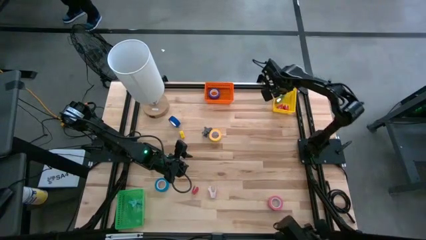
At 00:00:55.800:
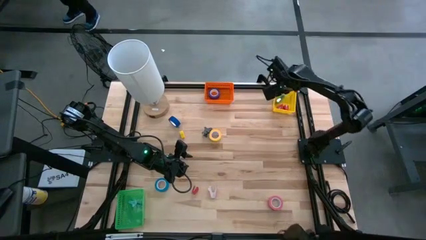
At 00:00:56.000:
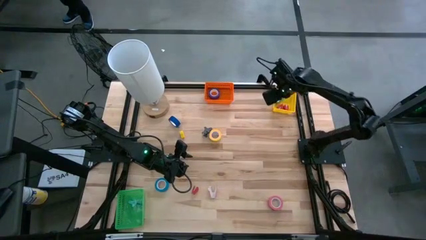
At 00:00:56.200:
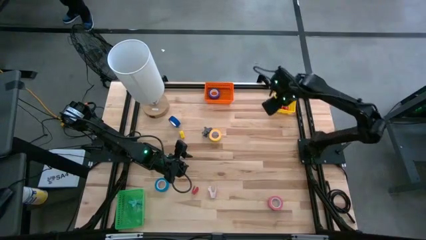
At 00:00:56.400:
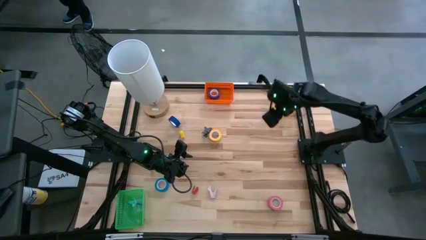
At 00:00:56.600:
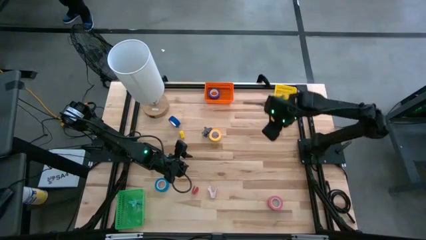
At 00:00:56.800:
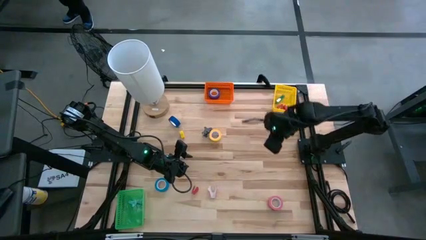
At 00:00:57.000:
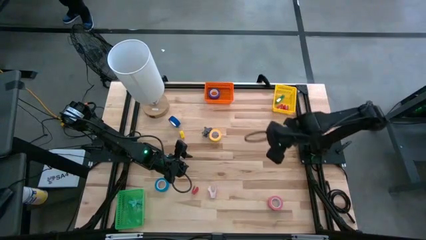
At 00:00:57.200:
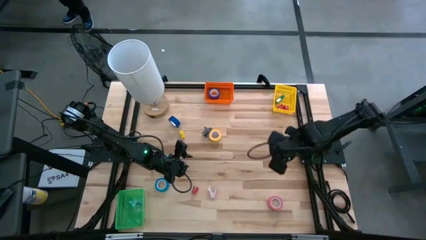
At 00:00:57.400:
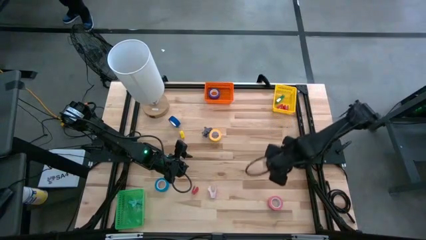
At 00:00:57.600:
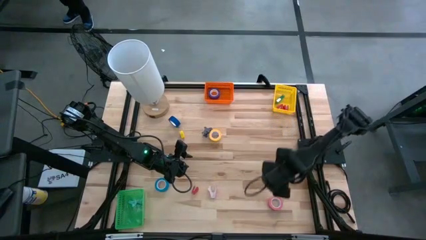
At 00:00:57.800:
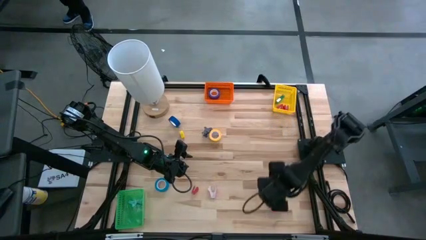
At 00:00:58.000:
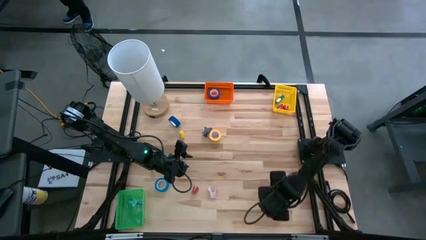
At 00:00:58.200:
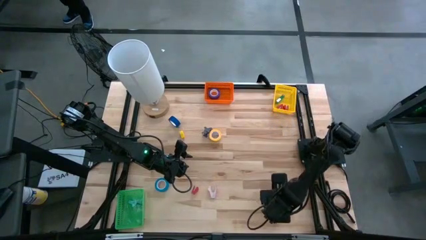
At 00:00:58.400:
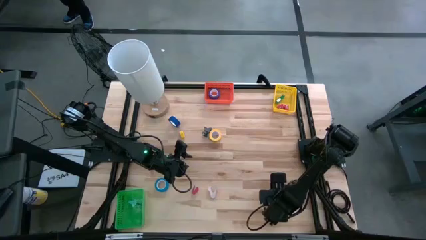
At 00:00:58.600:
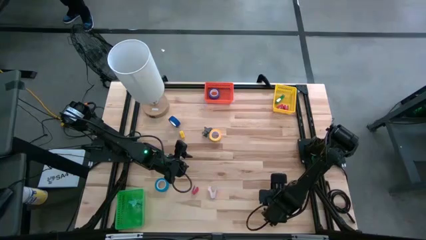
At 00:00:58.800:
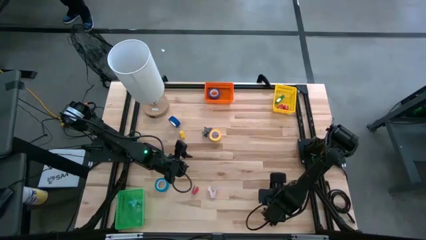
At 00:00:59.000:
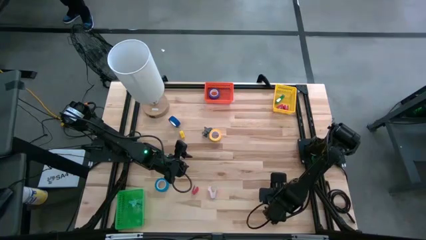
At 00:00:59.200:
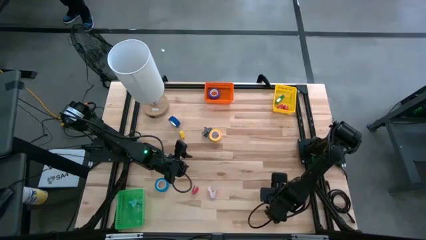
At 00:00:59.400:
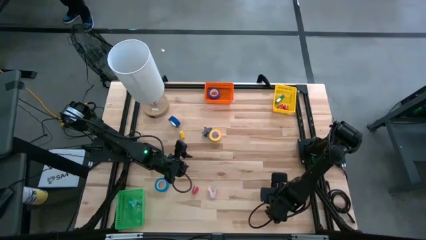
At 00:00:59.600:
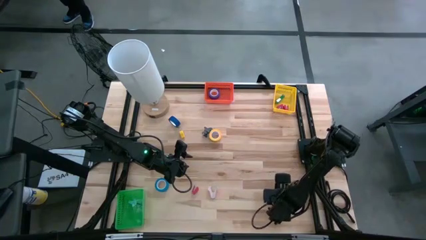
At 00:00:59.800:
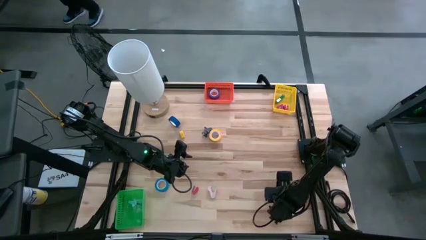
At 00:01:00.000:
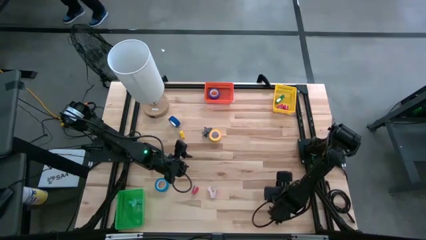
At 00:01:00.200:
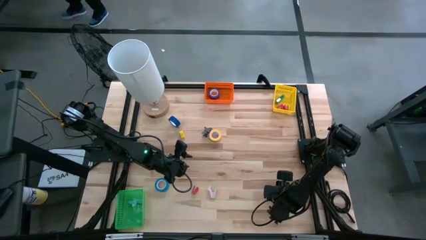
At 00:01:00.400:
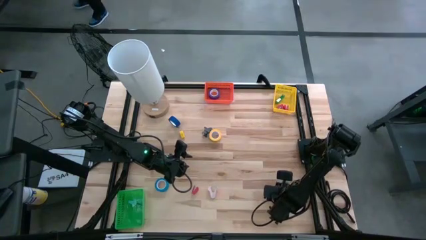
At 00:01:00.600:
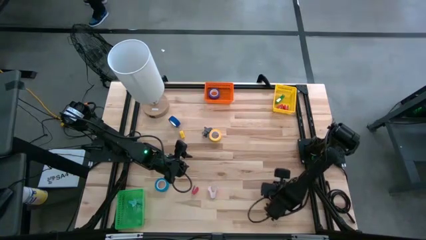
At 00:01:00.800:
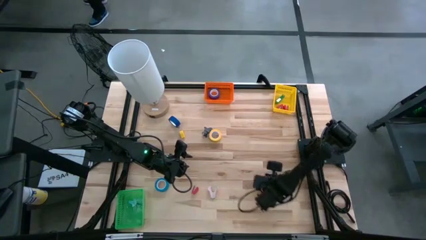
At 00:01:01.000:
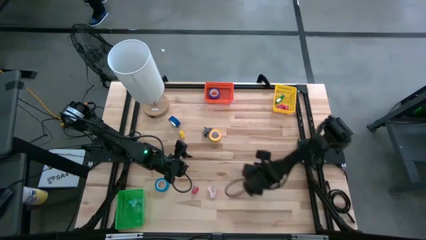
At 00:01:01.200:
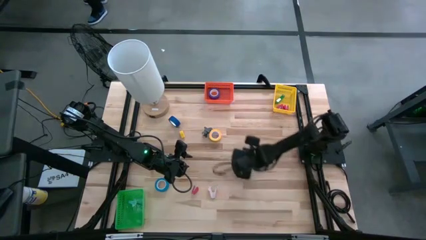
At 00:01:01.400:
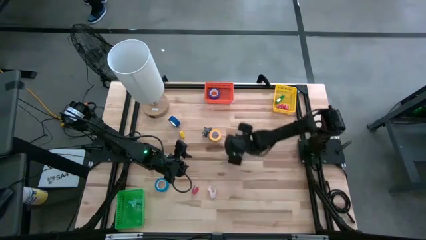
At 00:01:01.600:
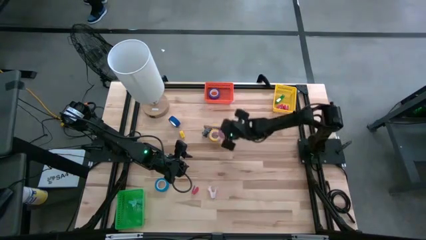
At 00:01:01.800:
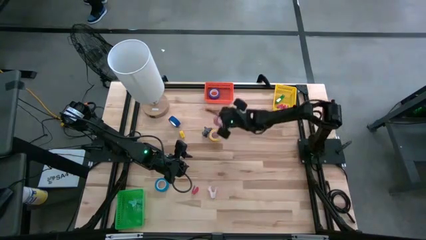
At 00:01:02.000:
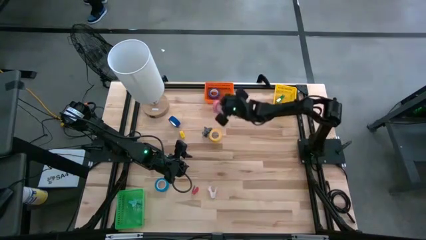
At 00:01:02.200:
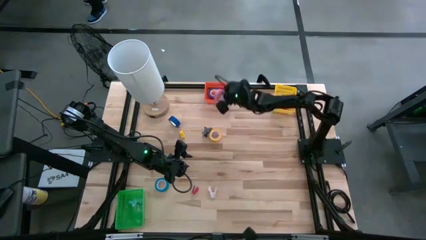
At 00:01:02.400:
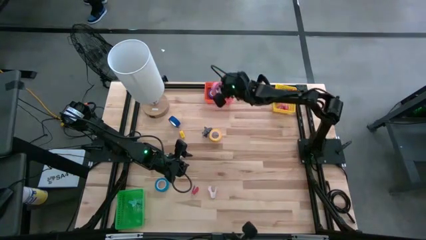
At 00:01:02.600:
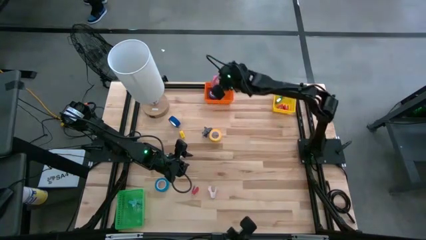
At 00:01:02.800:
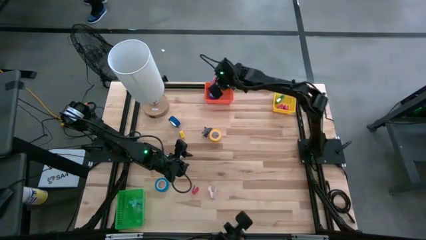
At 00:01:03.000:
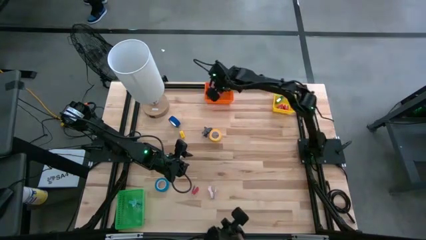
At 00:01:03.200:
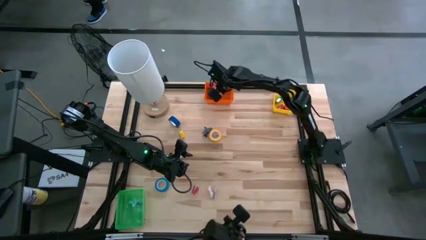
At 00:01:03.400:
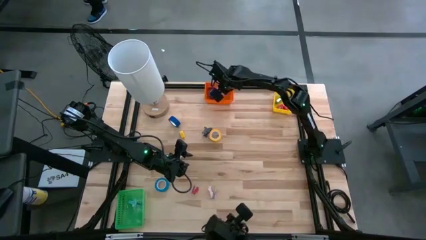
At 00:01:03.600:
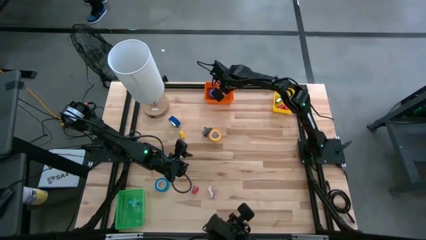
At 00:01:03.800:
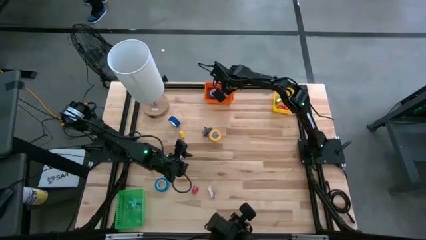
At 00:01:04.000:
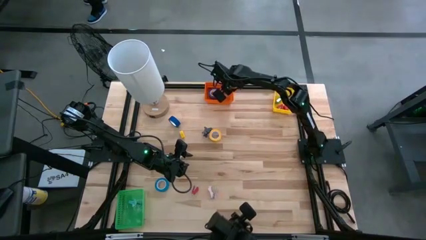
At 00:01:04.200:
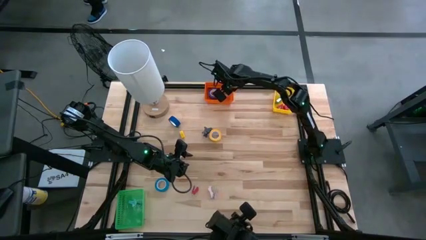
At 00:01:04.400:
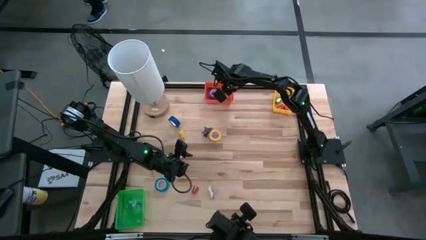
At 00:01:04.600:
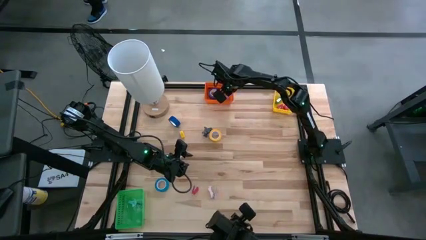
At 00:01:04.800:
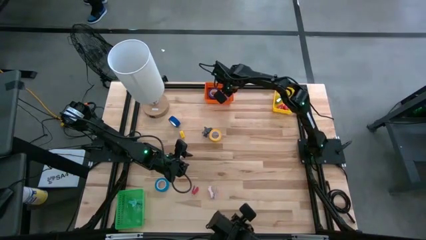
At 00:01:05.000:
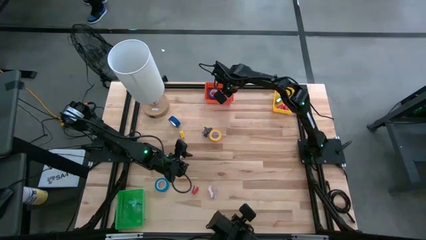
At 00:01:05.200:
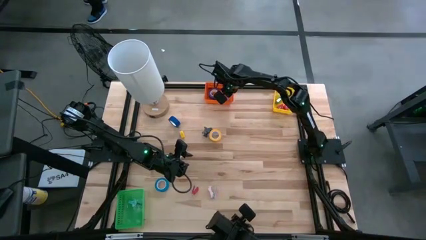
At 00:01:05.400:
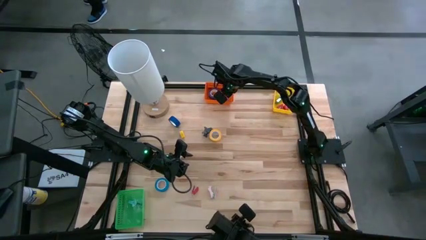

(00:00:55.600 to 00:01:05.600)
Task: Pick and place Stapler, Stapler remover, tape
Put the pink tape into the orange bin

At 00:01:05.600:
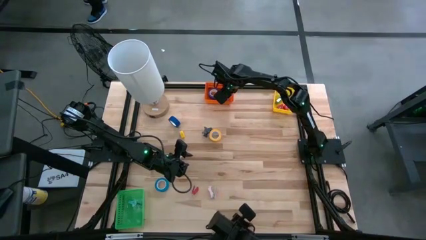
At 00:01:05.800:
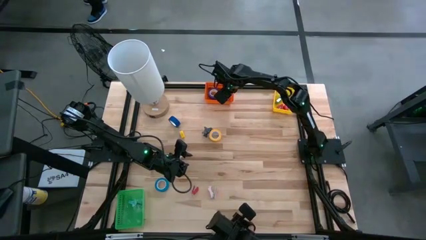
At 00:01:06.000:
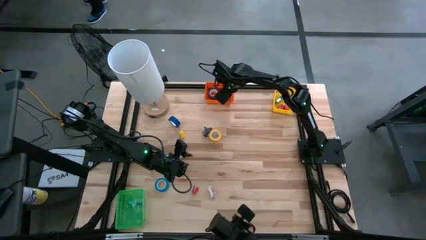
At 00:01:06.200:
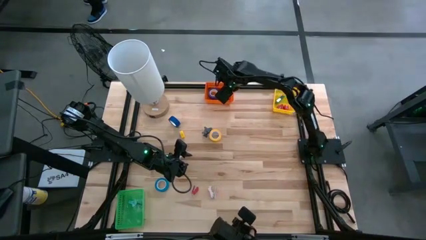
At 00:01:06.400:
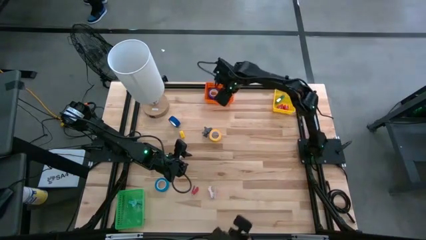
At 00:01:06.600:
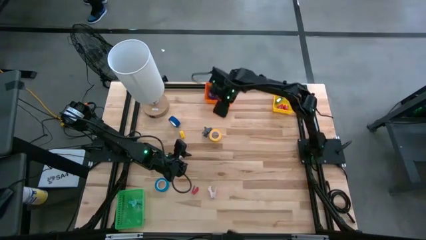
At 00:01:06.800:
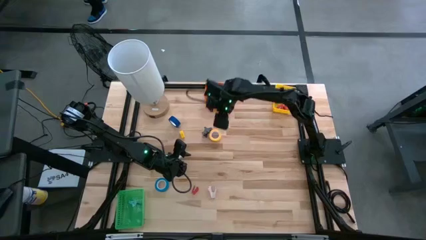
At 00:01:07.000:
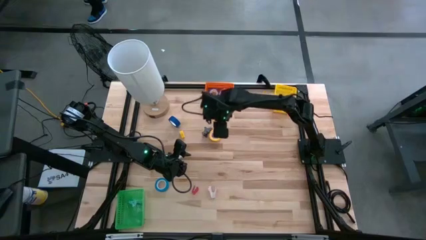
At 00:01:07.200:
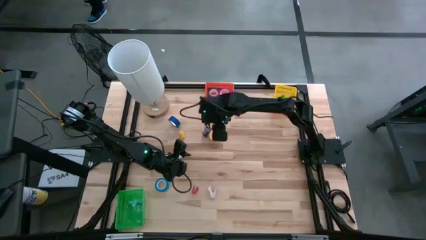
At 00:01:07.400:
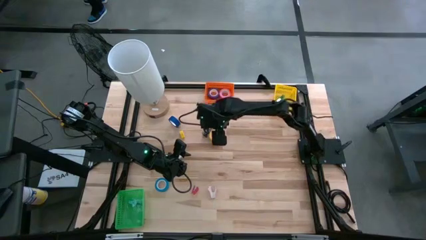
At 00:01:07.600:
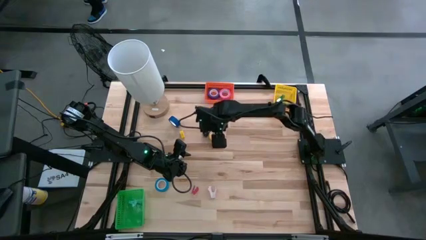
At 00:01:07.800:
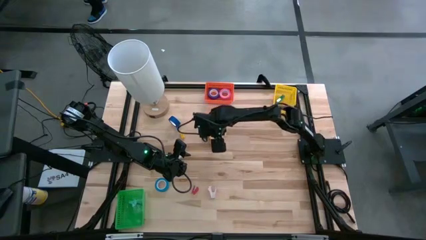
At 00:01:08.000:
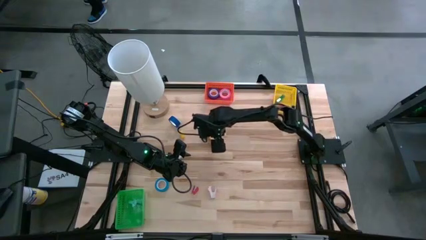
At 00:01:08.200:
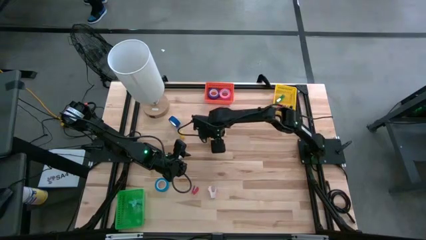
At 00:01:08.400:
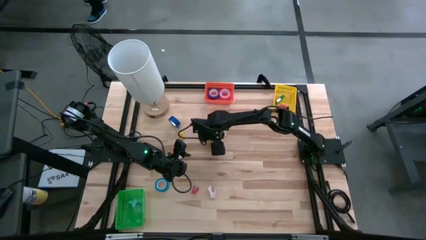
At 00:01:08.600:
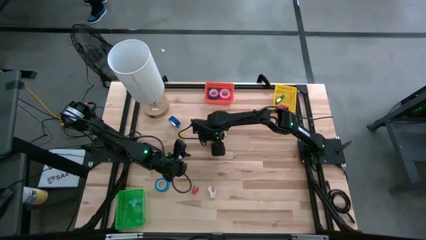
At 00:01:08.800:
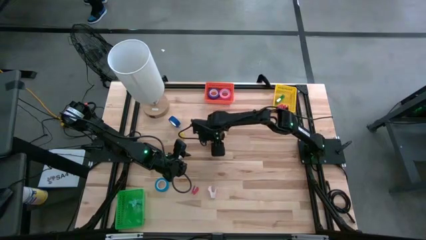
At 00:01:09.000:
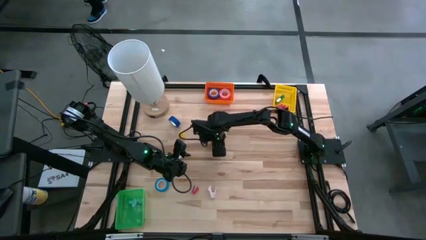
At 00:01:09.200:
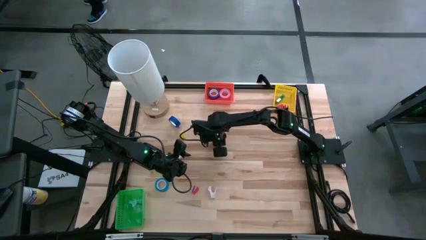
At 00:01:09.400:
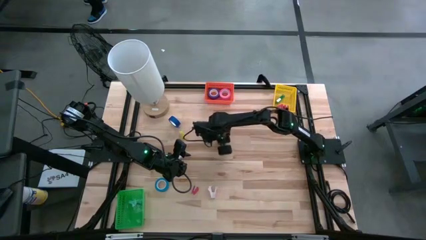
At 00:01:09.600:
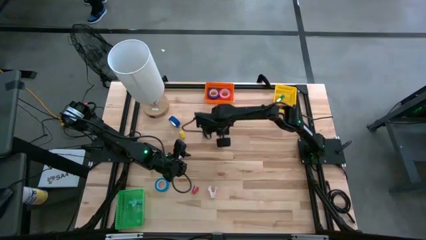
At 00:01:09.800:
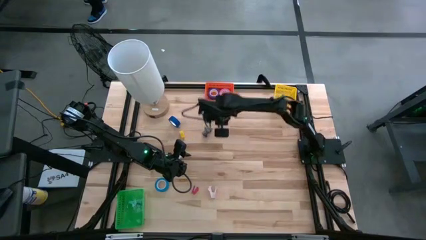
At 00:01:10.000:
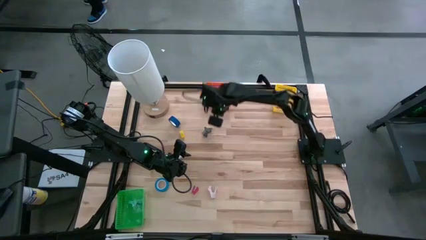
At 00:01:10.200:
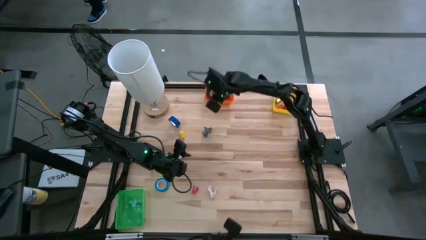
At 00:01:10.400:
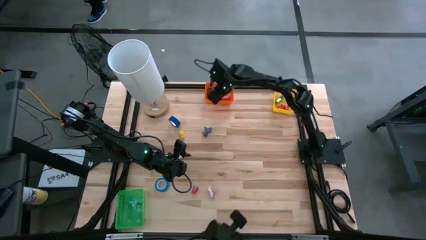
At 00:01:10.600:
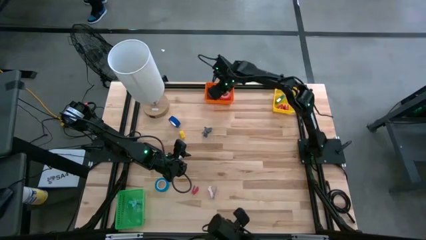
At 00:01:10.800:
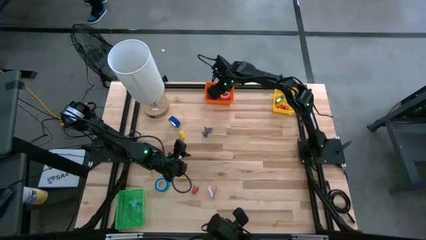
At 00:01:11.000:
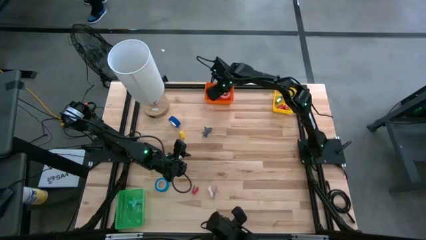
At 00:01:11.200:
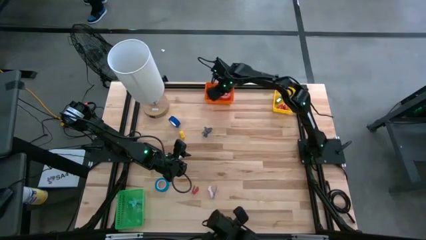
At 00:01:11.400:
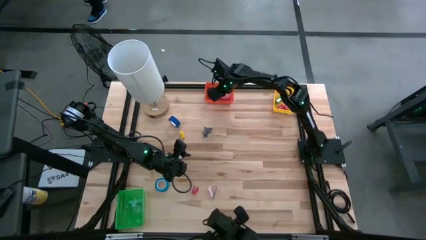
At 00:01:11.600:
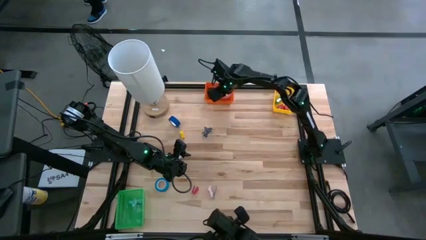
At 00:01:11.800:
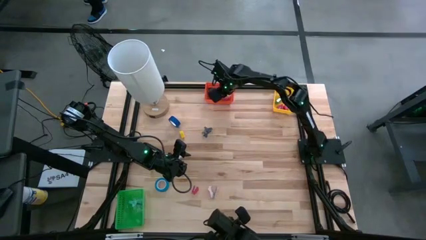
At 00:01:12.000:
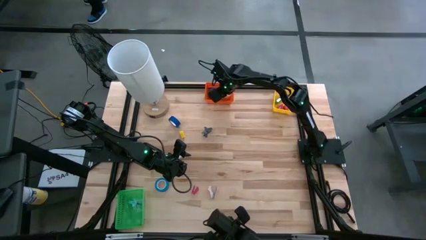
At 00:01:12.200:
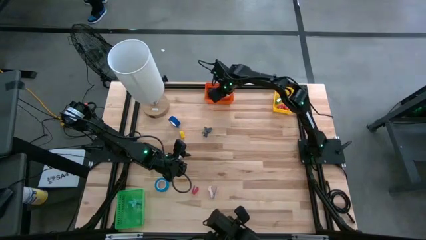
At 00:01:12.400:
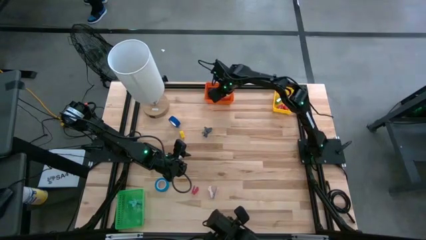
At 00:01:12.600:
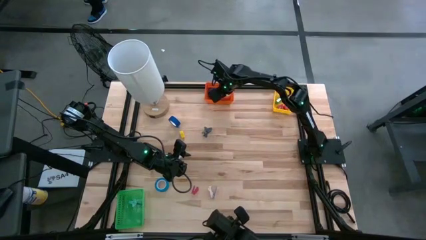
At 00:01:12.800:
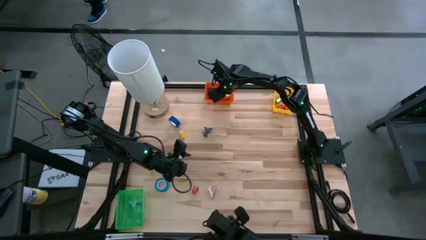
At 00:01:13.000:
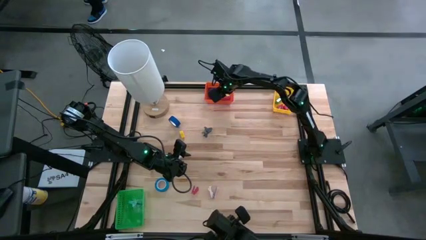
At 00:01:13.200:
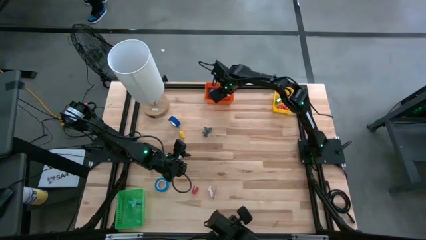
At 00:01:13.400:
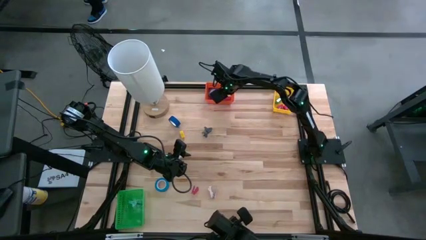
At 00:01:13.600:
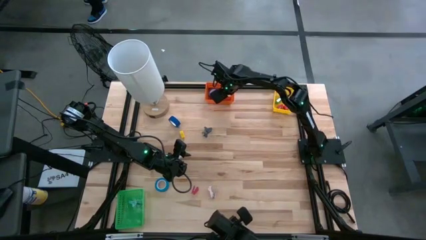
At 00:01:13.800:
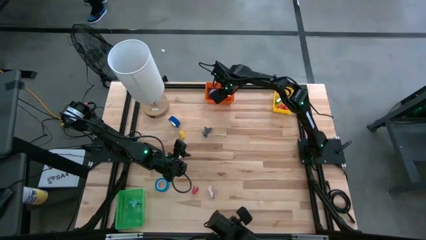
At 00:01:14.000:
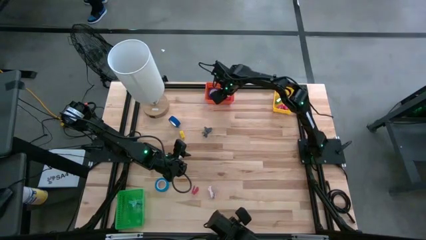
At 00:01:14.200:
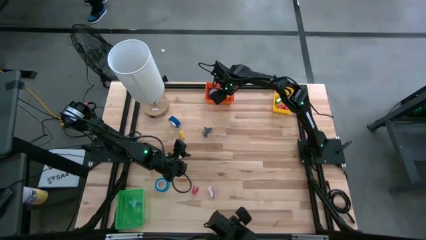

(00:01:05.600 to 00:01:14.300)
Put the yellow tape into the orange bin
